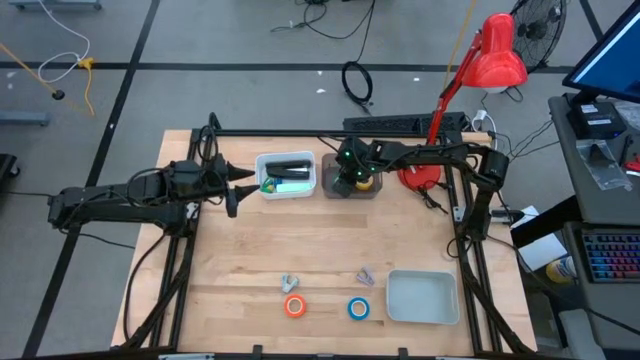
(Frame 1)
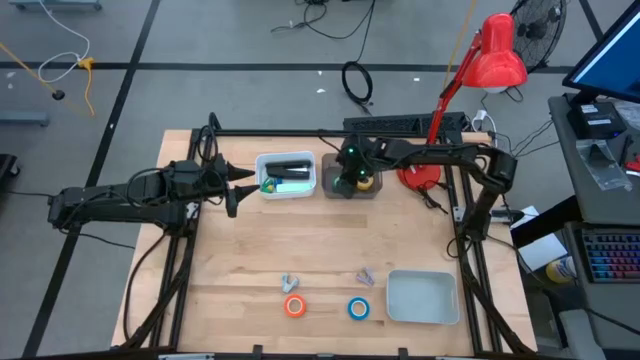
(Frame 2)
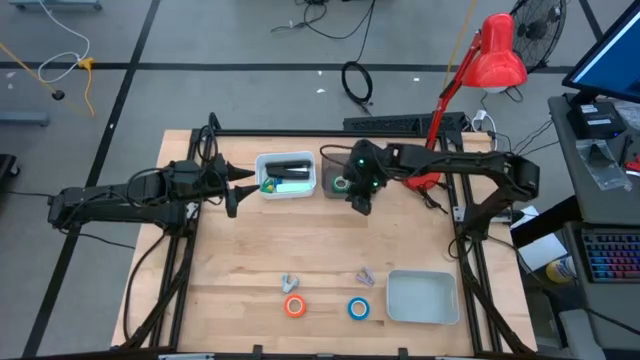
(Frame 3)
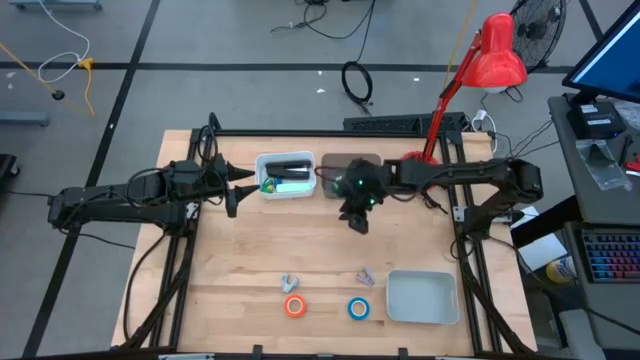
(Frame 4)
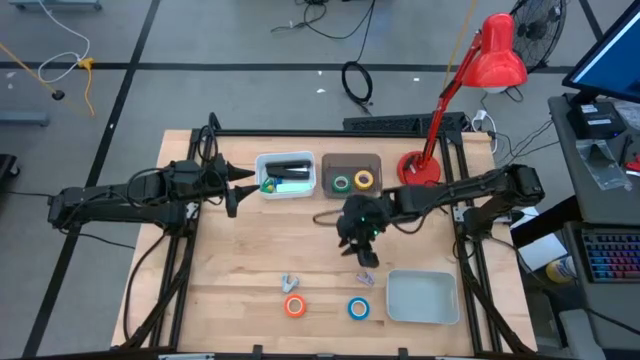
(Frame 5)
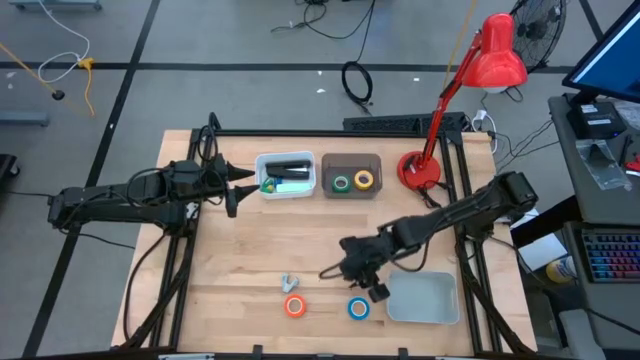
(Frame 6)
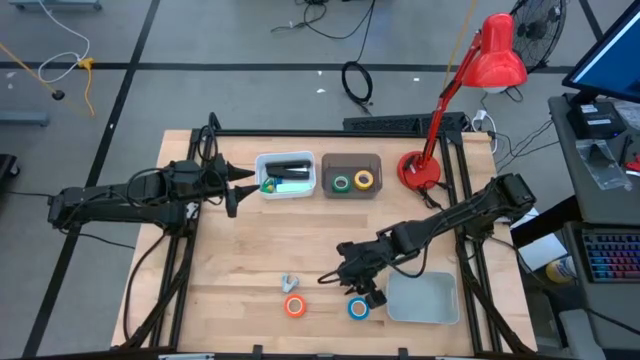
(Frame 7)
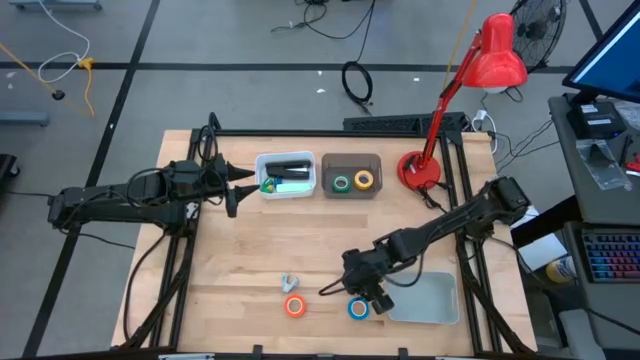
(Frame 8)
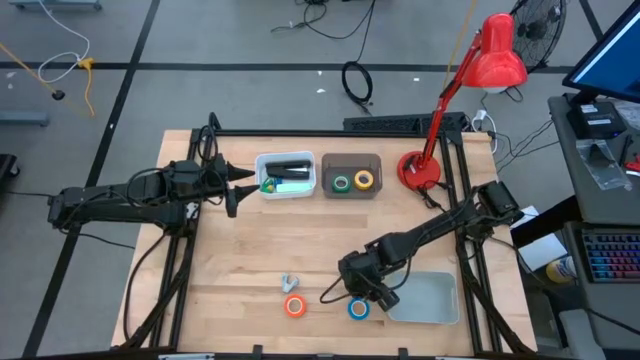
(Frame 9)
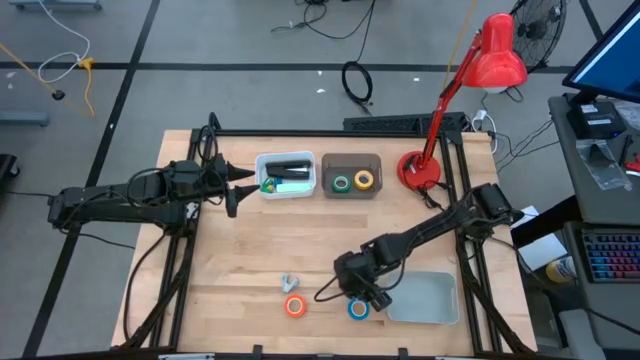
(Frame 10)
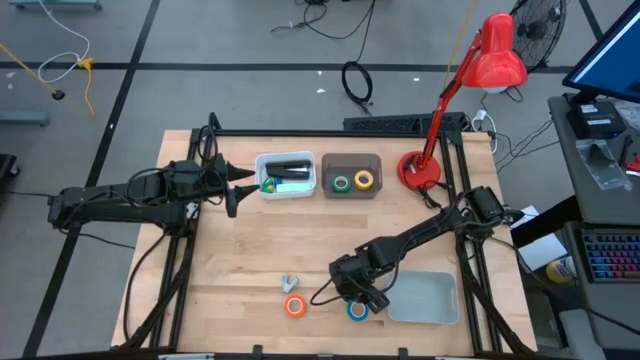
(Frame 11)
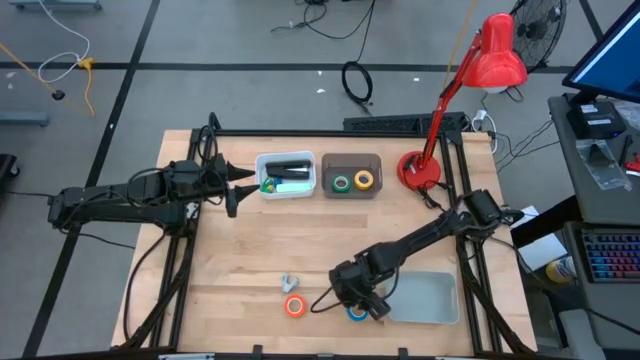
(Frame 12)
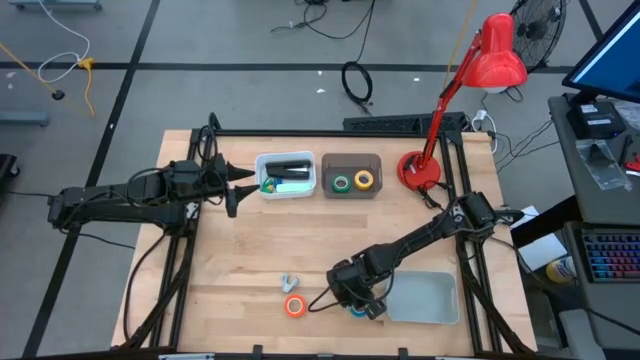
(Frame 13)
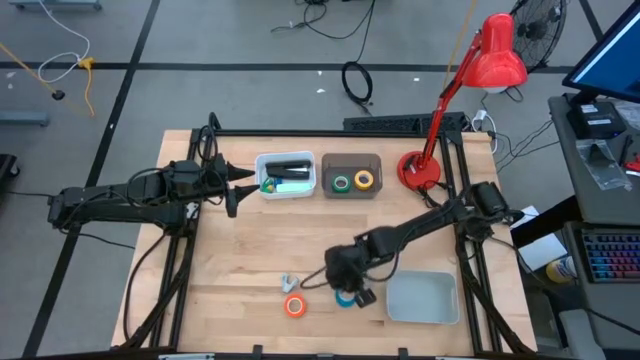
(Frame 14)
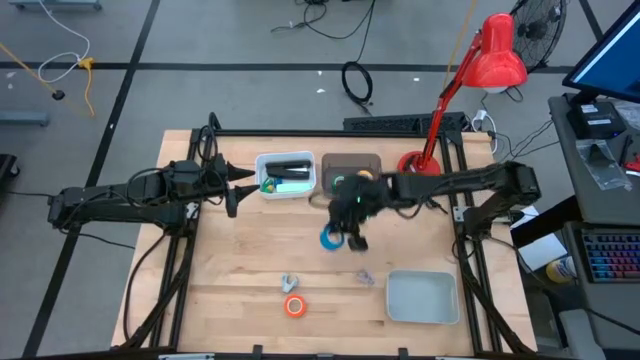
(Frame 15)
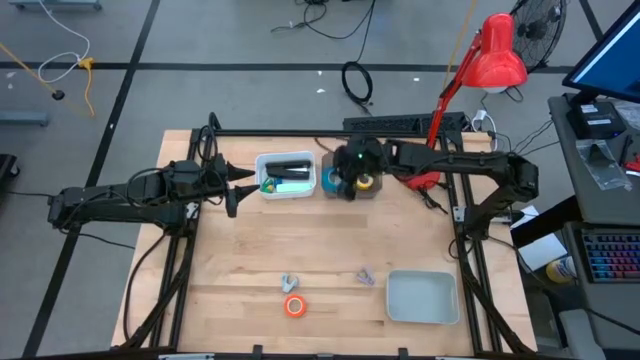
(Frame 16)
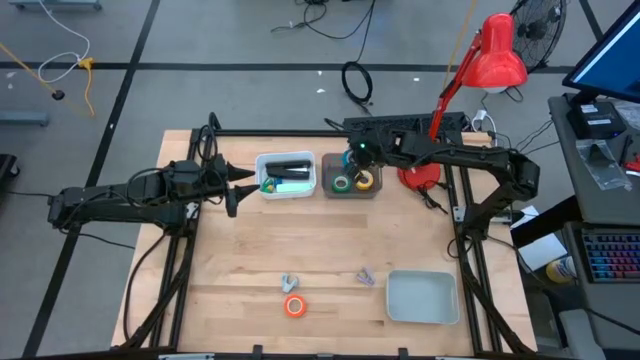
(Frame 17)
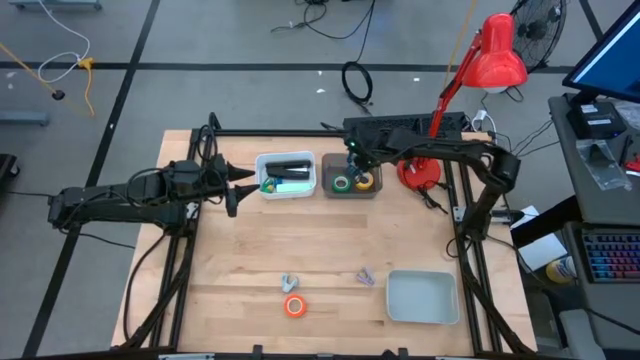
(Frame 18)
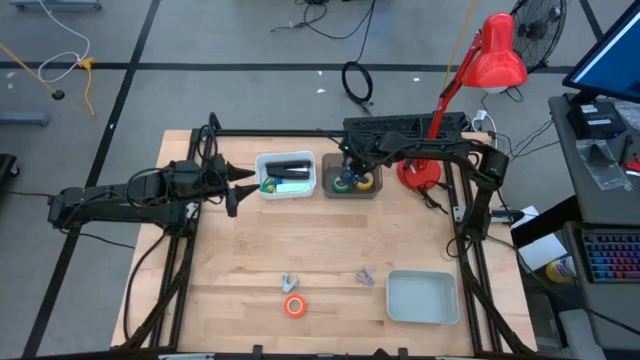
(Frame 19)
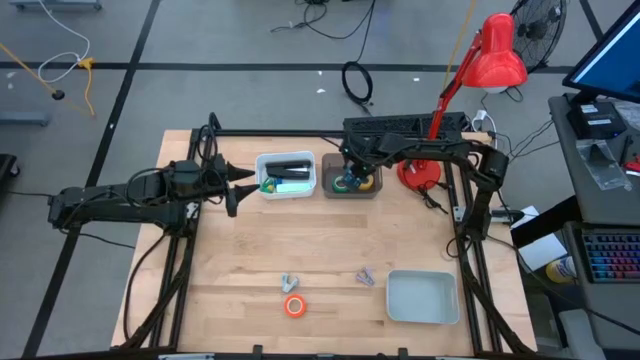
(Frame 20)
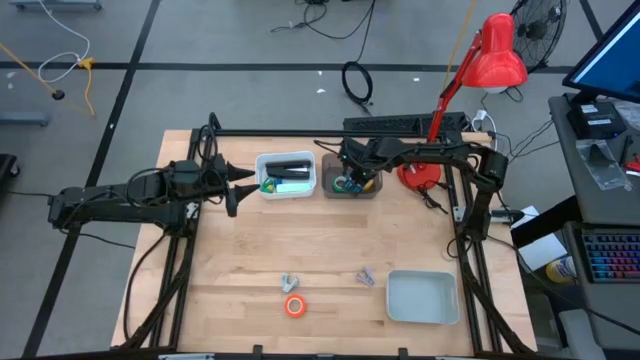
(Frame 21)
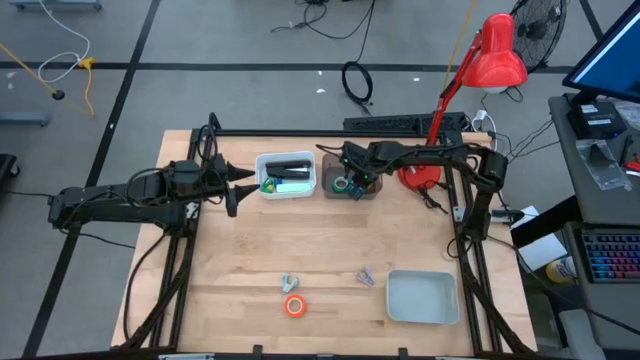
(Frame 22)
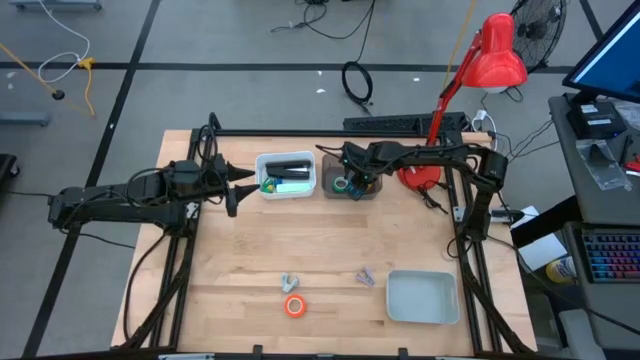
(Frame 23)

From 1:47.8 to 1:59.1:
Task: Pick and place Stapler, Stapler remover, tape
Put the blue tape into the black bin

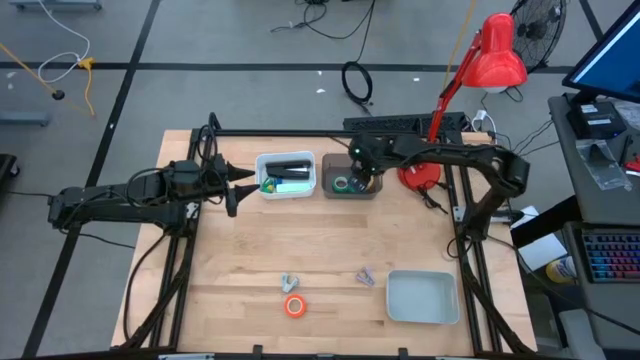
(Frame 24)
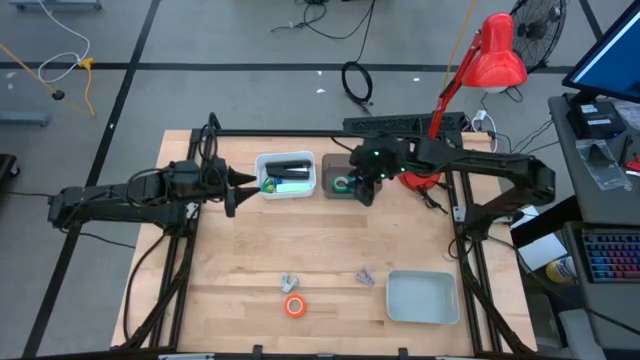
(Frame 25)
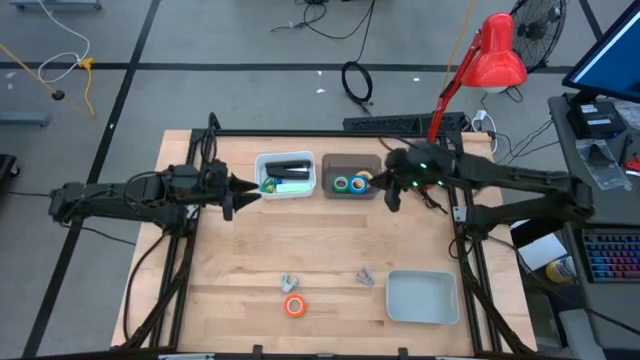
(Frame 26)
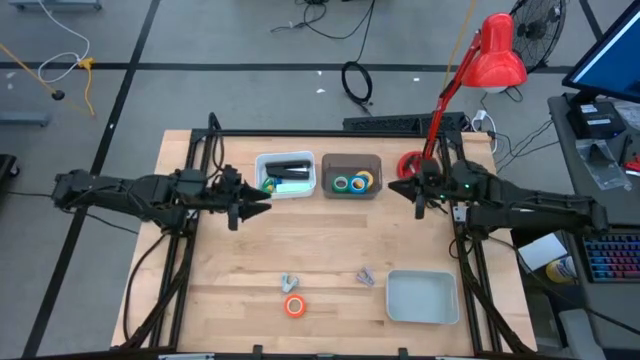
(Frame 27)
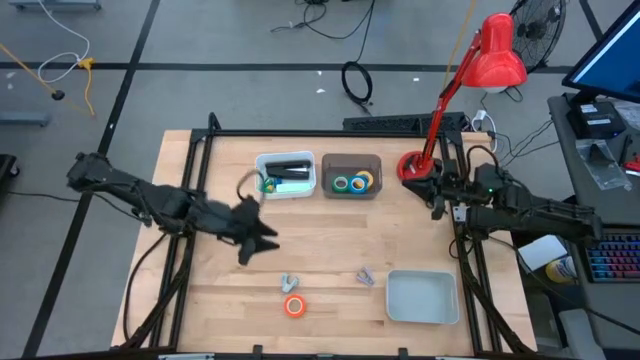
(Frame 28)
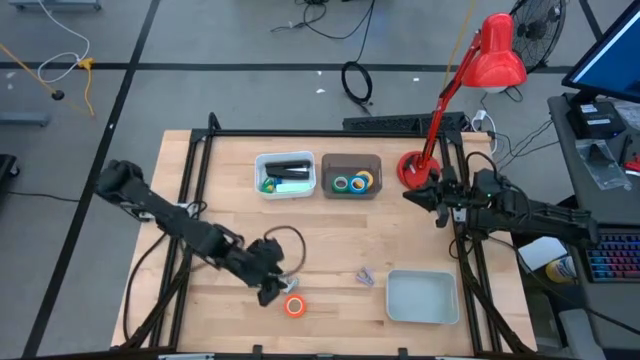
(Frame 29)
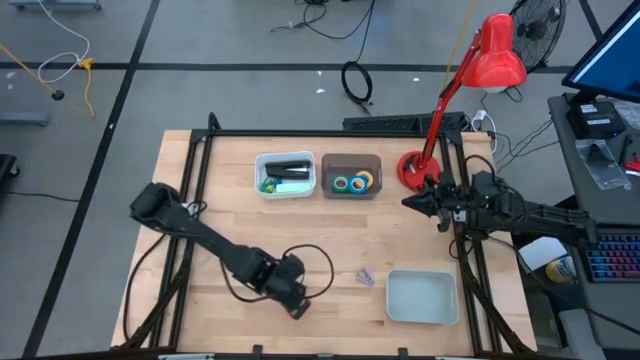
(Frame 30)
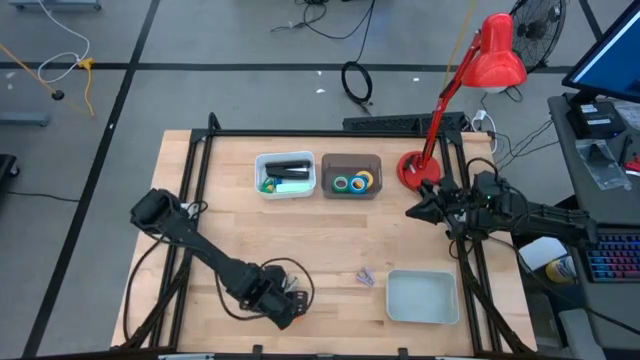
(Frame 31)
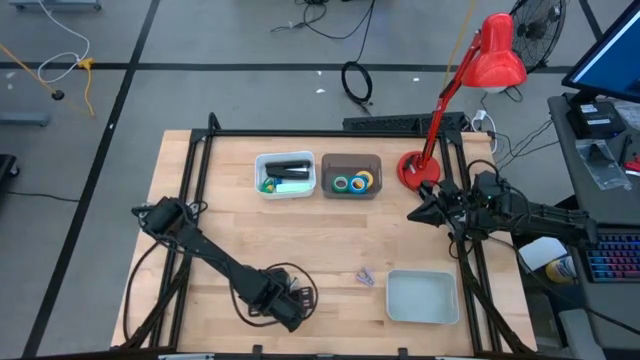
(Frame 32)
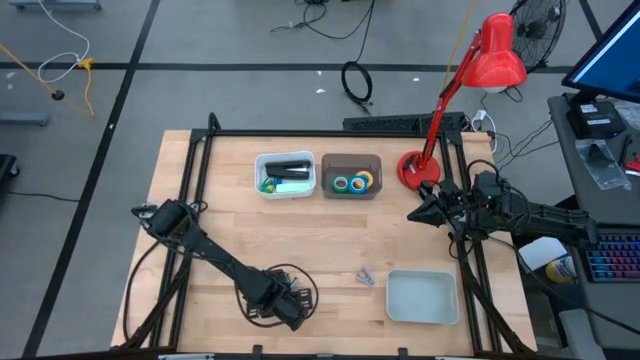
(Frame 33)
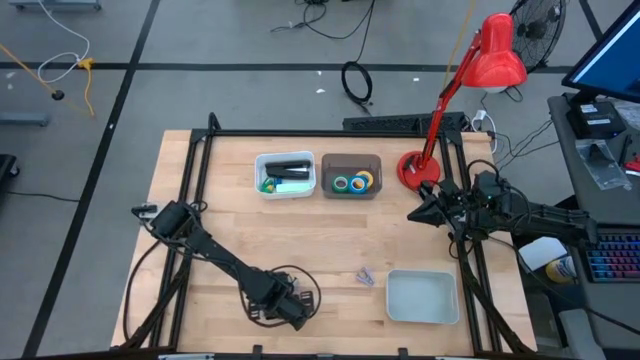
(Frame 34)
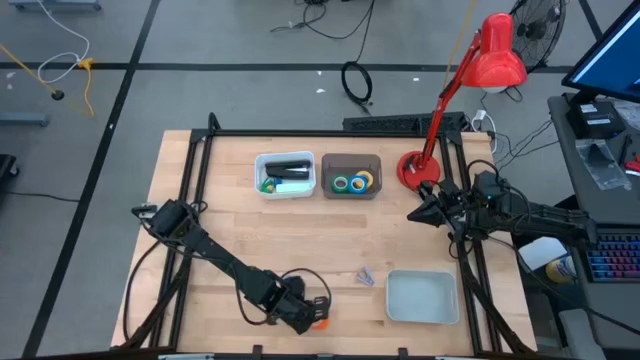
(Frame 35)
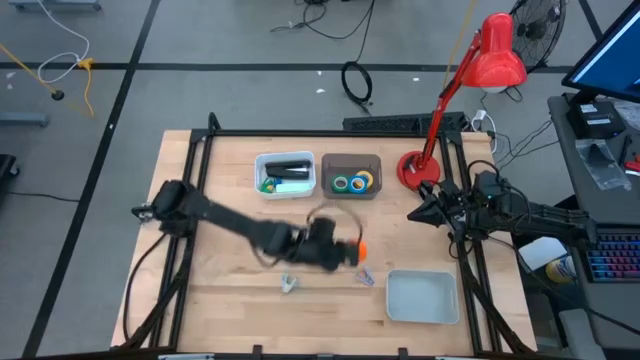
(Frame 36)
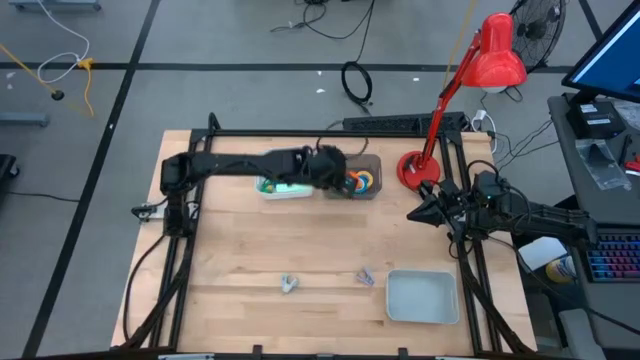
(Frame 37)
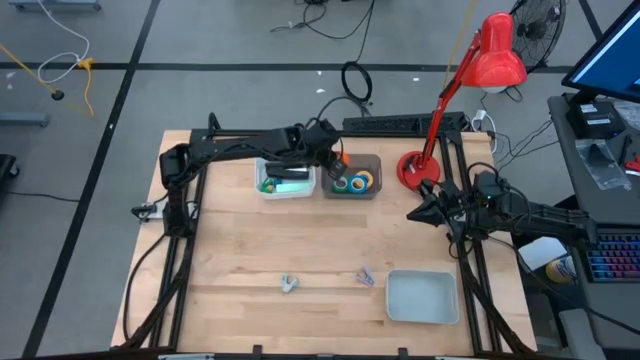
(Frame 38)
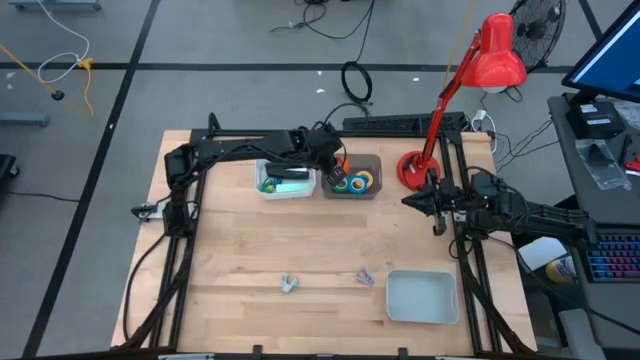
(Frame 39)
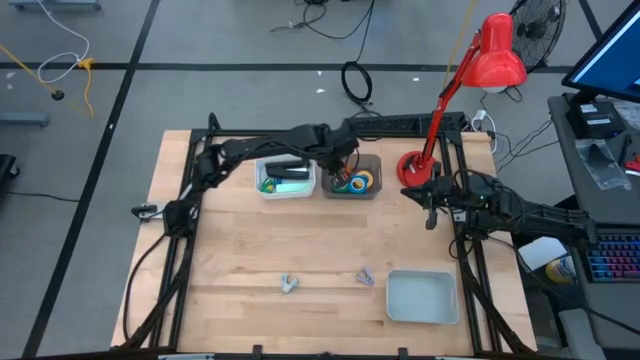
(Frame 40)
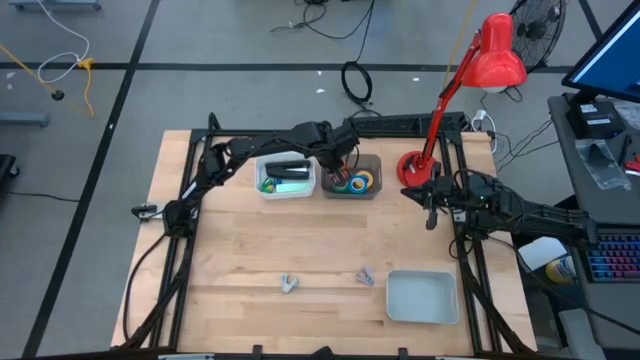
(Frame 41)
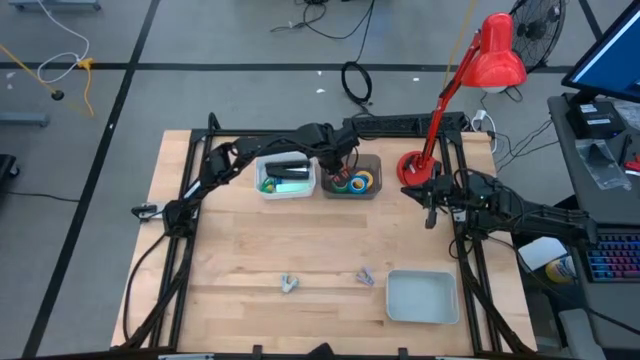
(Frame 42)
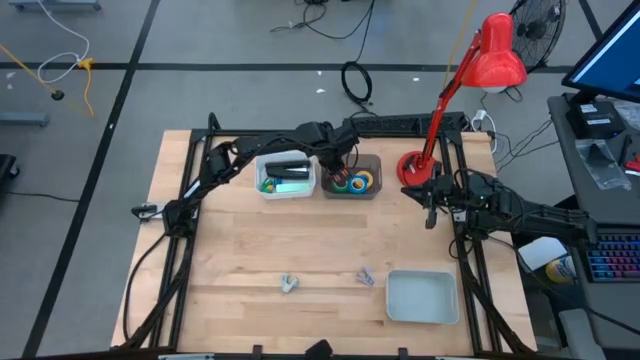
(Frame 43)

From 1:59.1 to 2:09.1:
Put the orange tape into the black bin
